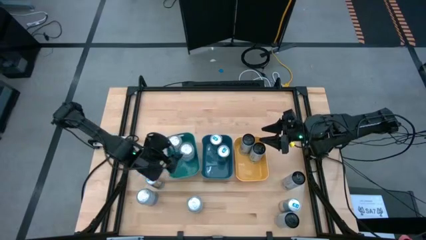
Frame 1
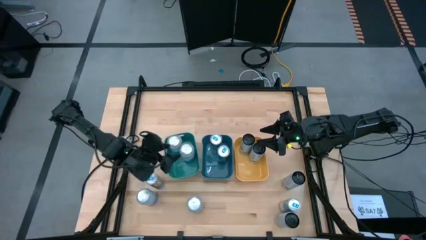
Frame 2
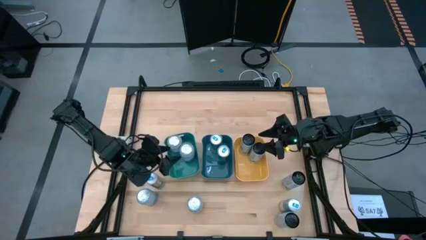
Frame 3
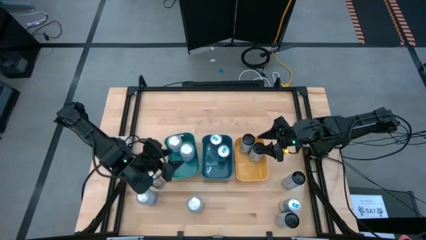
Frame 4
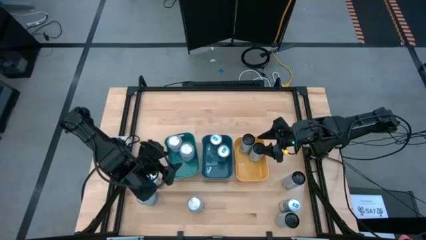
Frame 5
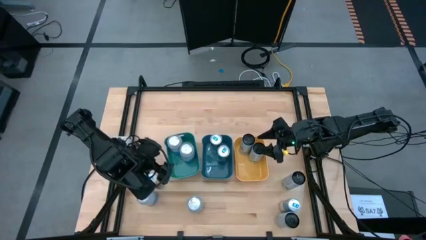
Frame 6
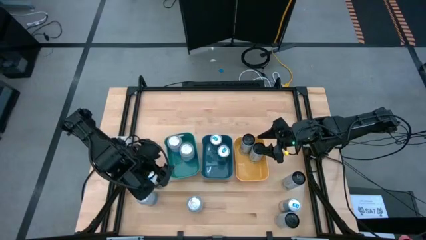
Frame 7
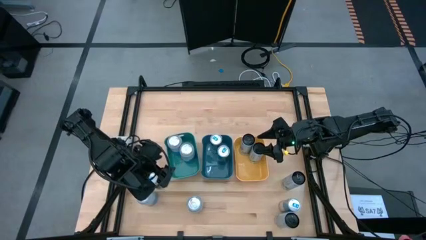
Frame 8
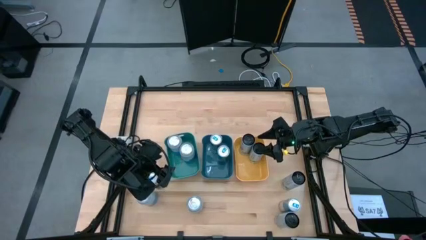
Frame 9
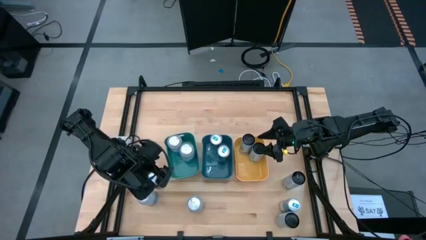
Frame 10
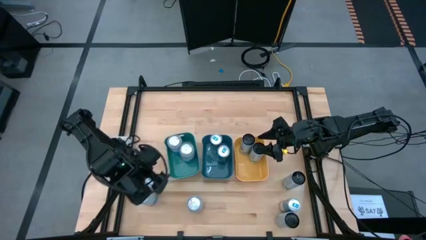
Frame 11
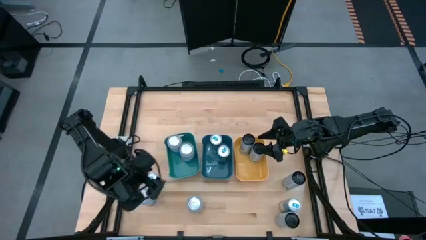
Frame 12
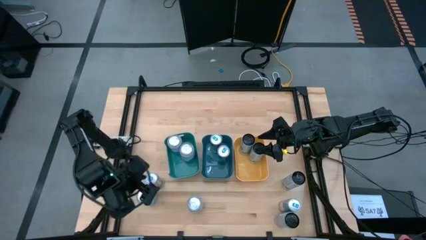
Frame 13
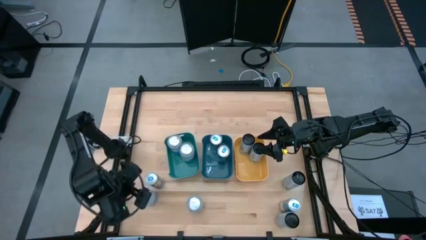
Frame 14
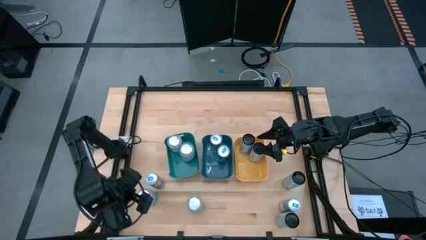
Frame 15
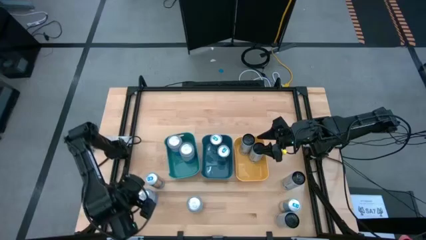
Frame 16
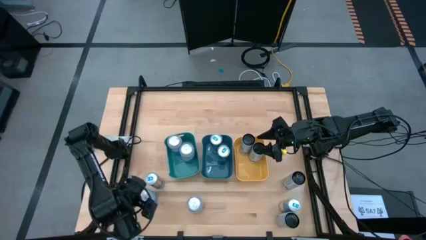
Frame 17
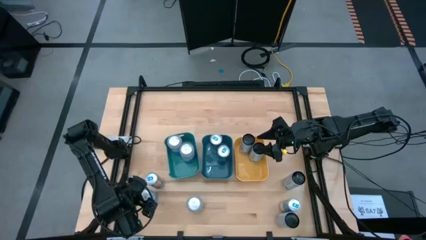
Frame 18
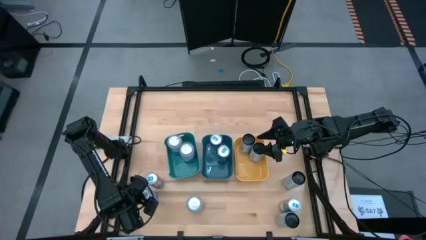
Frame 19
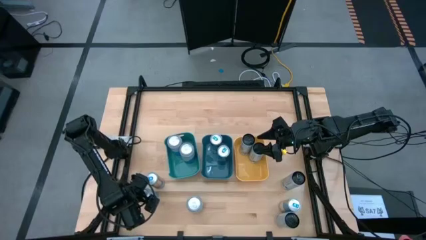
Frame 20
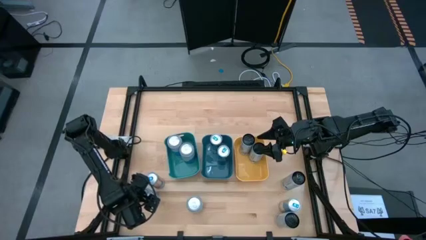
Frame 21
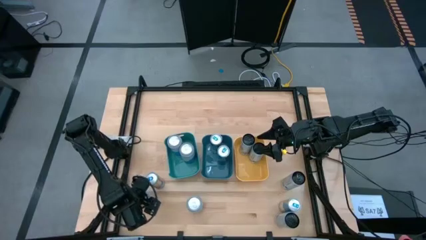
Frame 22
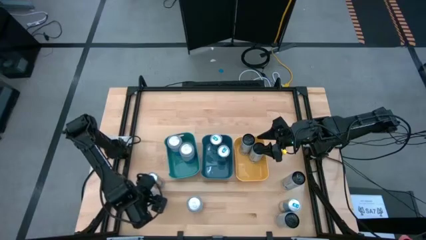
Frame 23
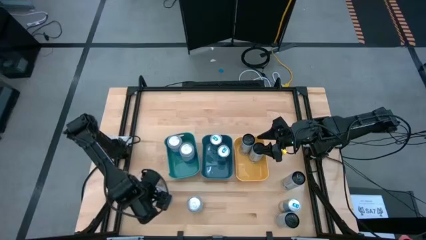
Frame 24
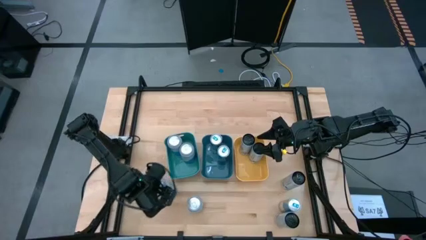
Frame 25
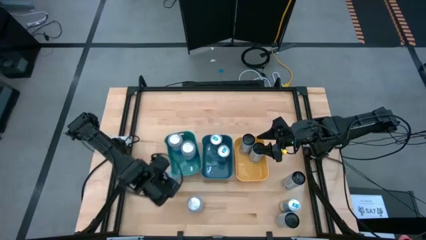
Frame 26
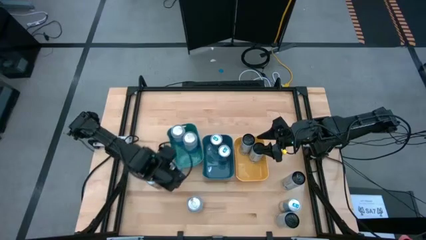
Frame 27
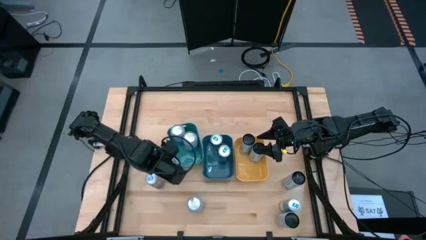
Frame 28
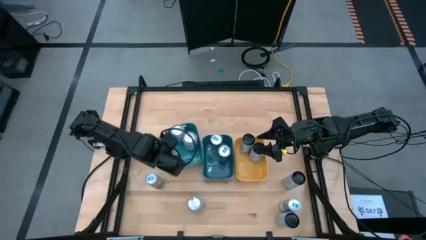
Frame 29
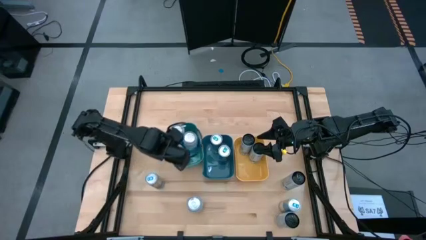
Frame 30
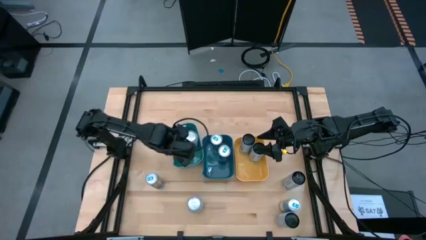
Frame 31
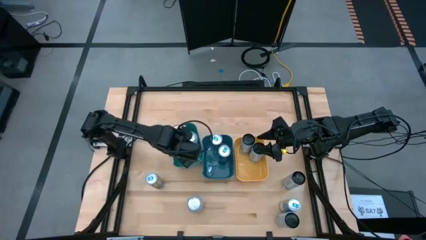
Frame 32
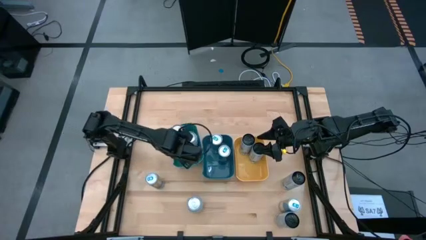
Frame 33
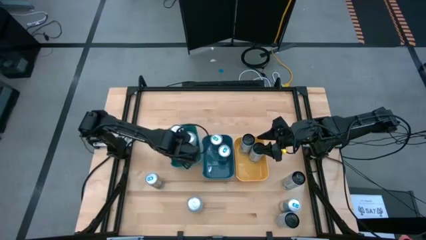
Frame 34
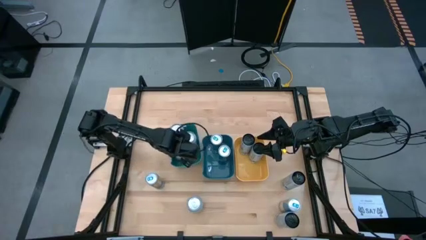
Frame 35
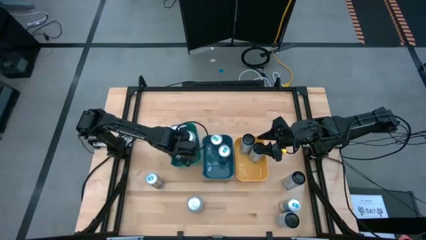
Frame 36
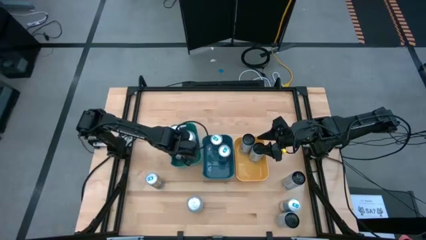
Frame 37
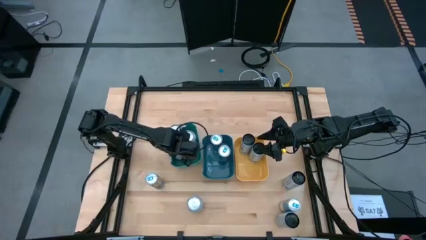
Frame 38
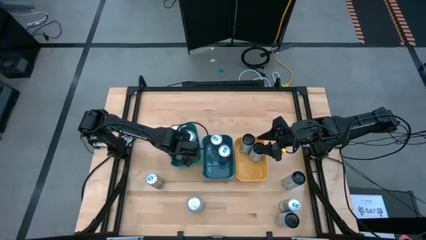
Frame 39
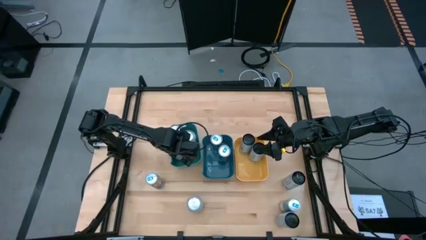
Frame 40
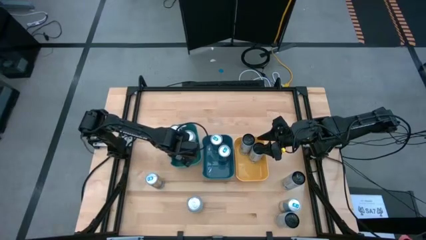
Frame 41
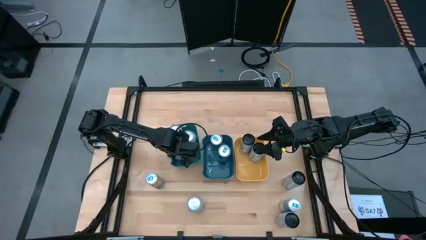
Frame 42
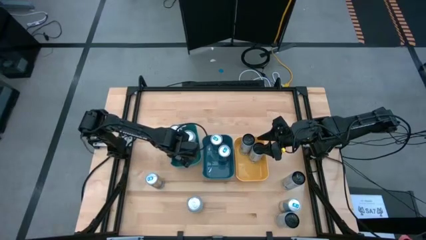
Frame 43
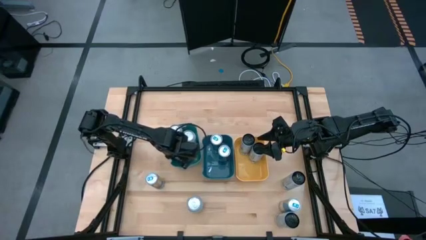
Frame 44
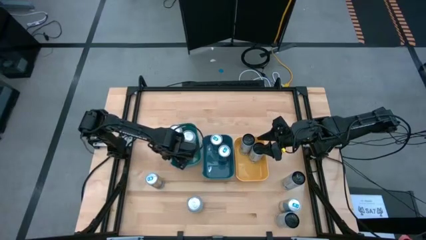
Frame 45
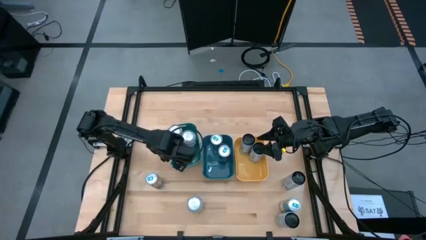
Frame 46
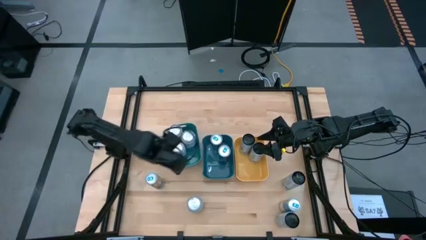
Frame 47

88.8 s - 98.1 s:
Task: Sort soda cans
Put the blue-white soda can into the green bin

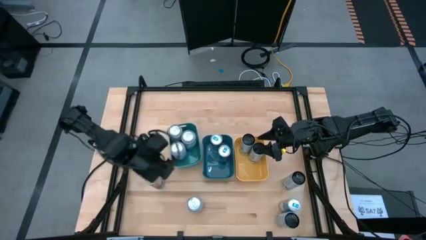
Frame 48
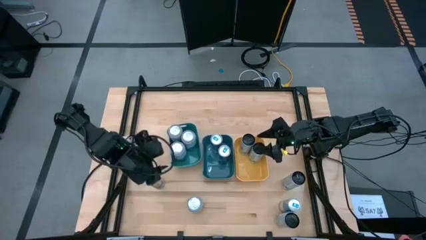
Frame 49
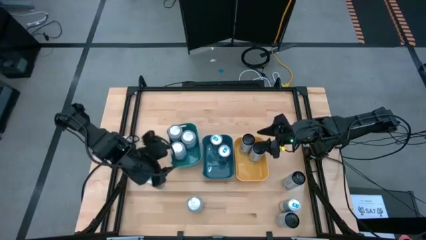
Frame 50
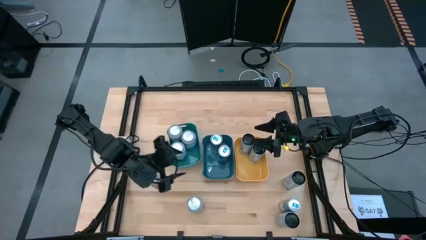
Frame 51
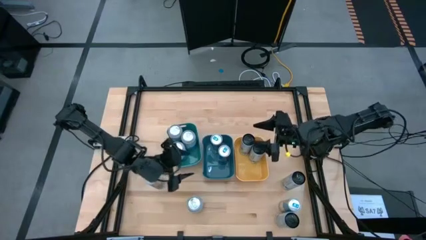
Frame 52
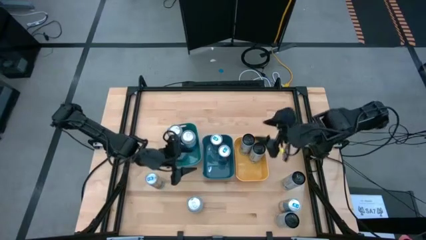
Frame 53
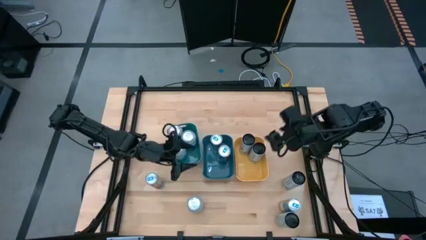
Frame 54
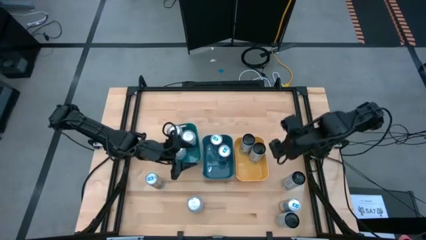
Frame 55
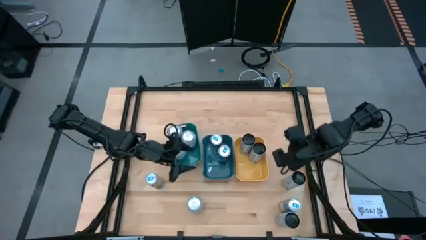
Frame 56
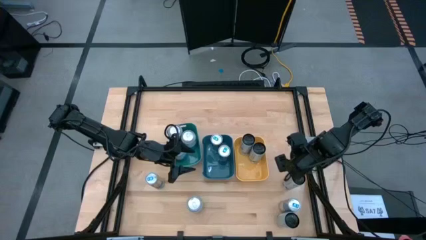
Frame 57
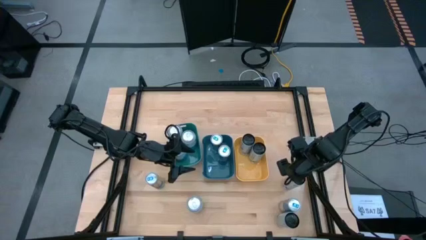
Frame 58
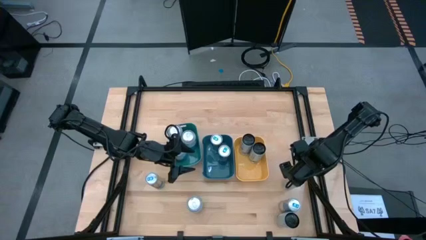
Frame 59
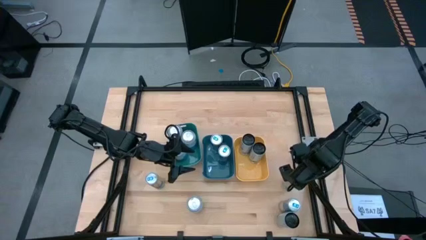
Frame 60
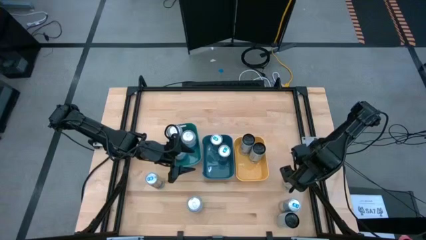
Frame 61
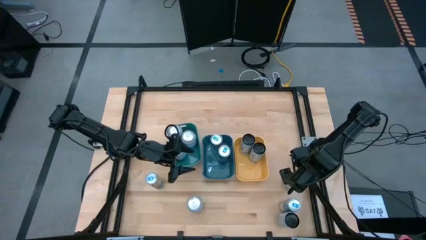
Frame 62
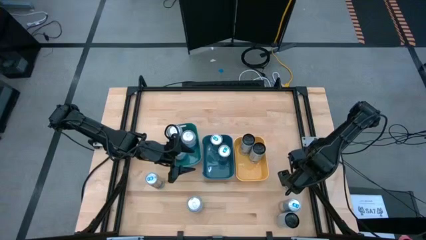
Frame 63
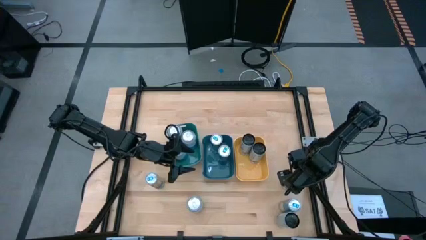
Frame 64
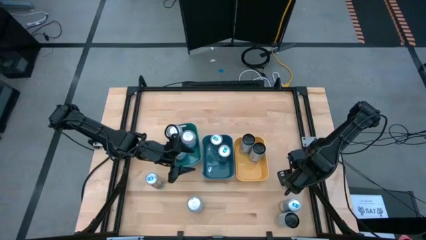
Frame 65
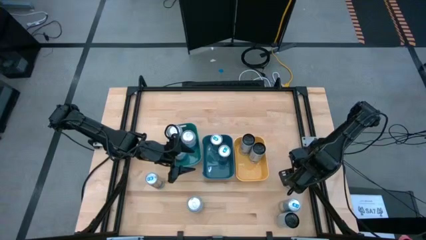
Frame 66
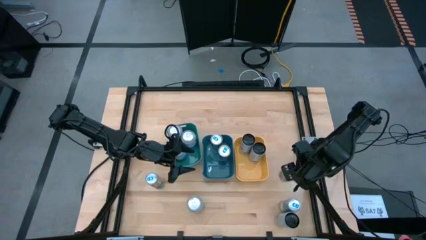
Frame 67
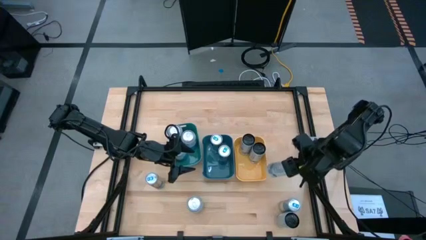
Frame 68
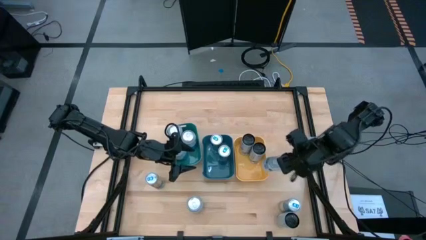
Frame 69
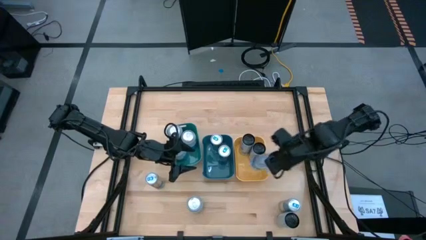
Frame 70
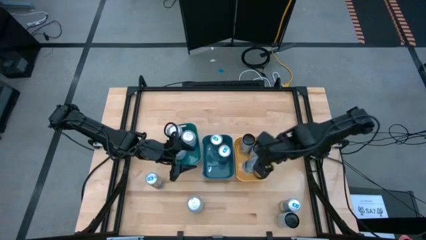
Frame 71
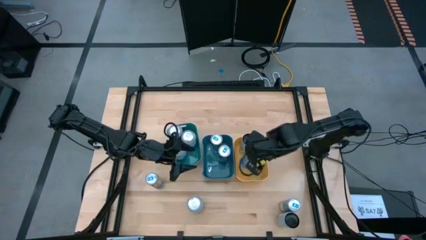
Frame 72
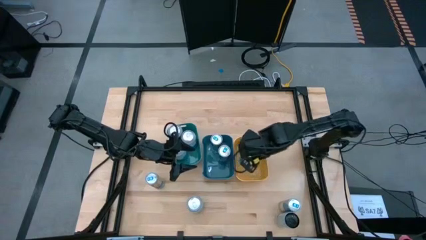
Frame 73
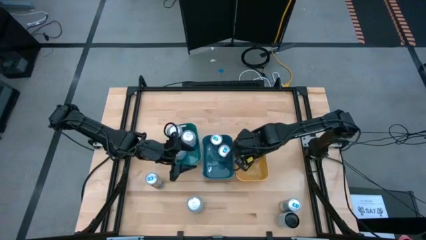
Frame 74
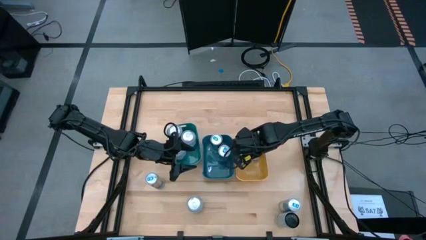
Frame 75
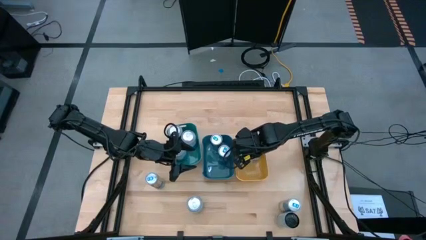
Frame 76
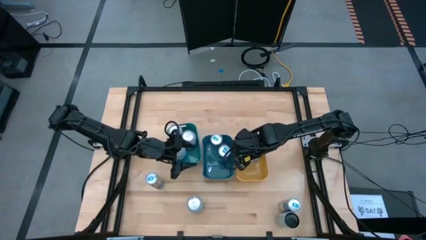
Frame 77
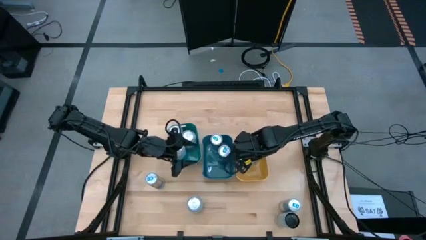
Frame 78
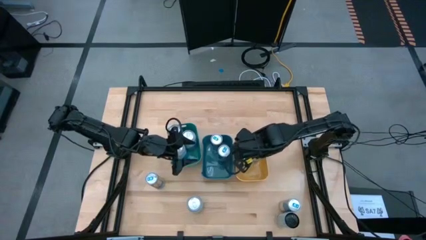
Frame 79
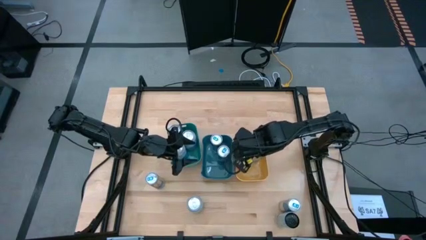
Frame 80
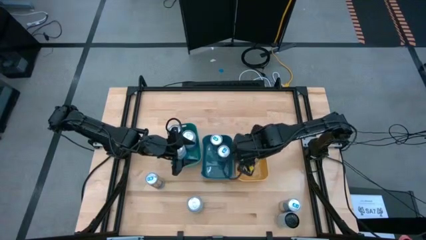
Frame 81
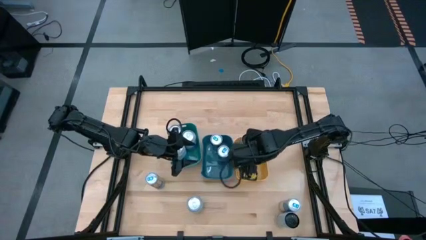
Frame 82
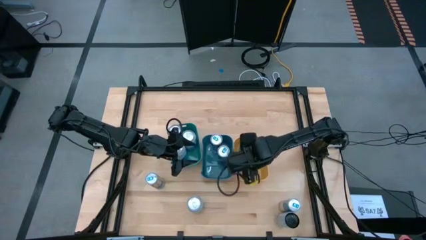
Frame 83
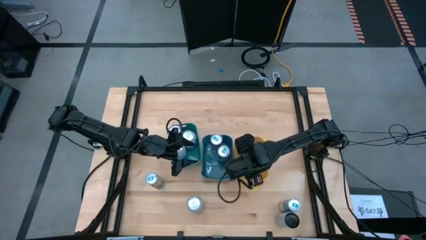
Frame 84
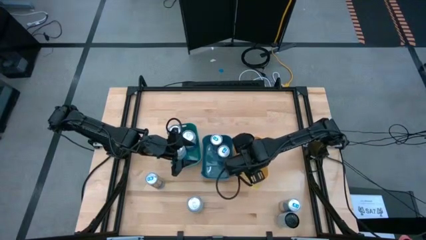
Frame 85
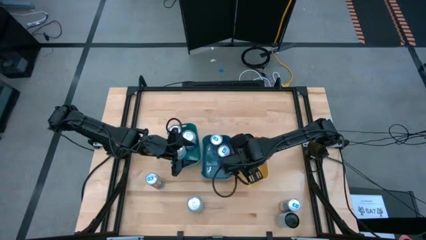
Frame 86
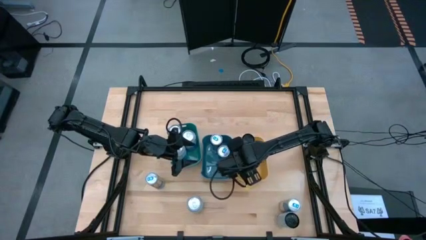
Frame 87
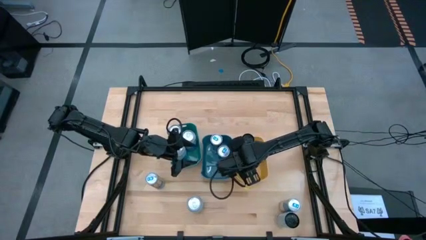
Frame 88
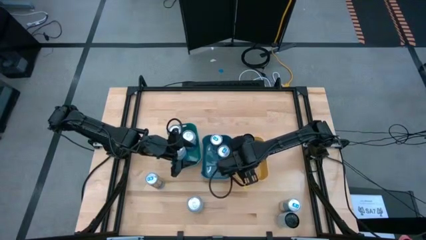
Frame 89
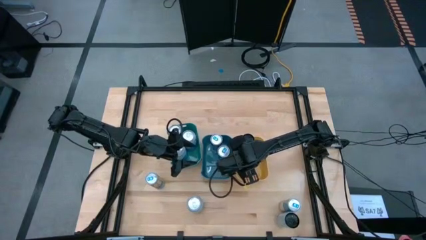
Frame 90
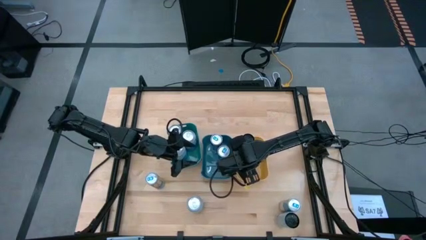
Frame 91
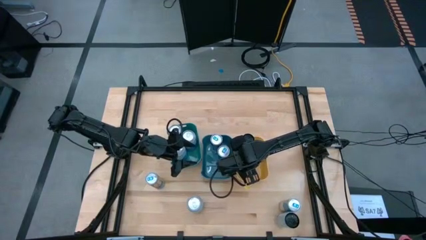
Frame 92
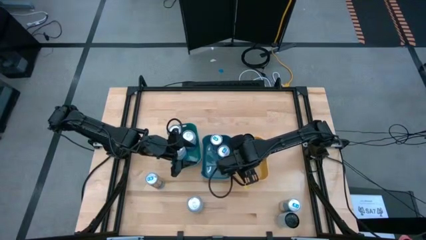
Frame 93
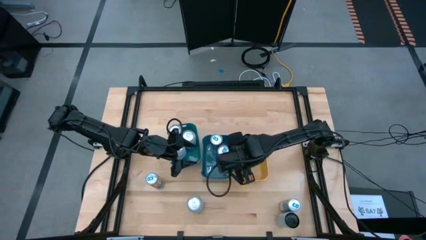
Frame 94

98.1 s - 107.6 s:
Put the white-blue soda can into the yellow bin
